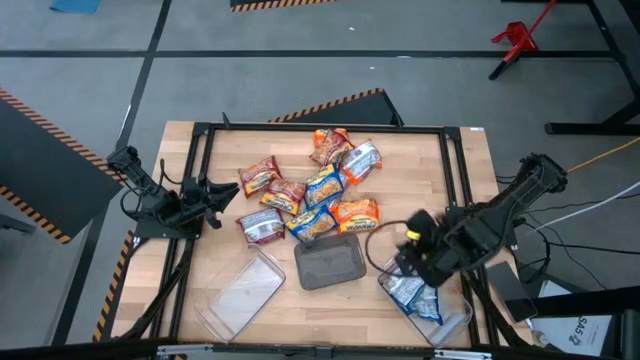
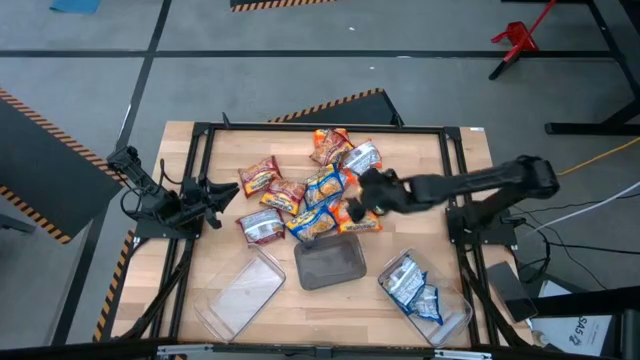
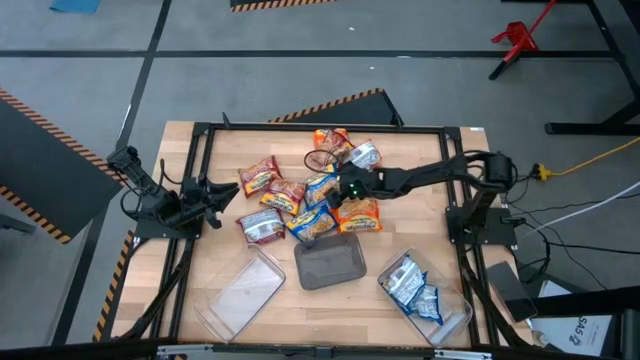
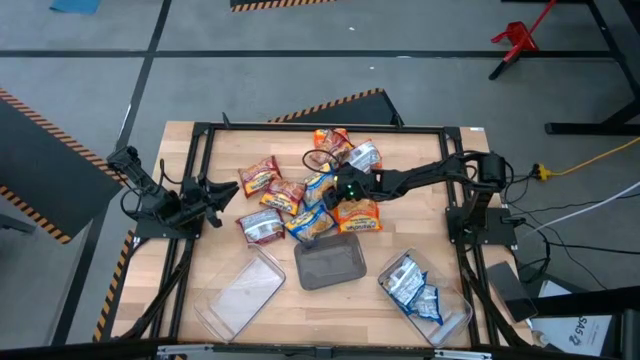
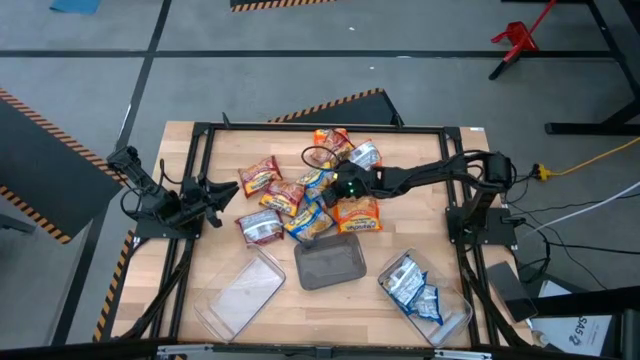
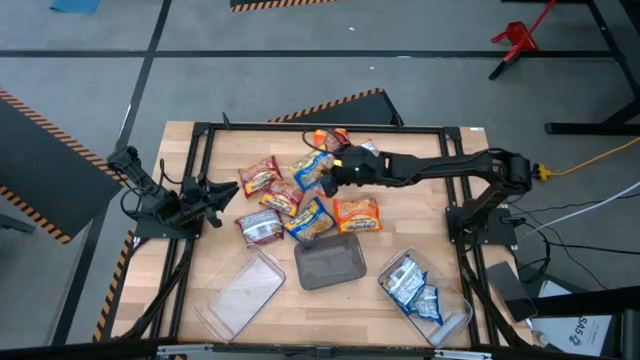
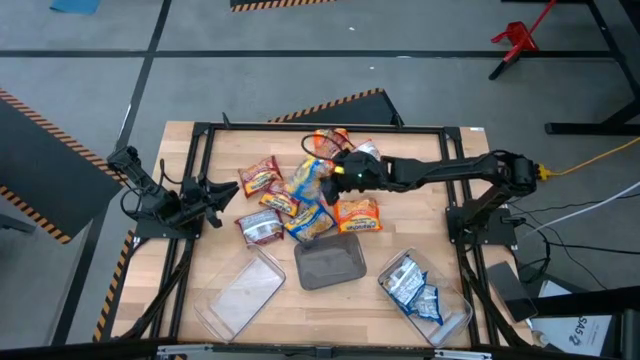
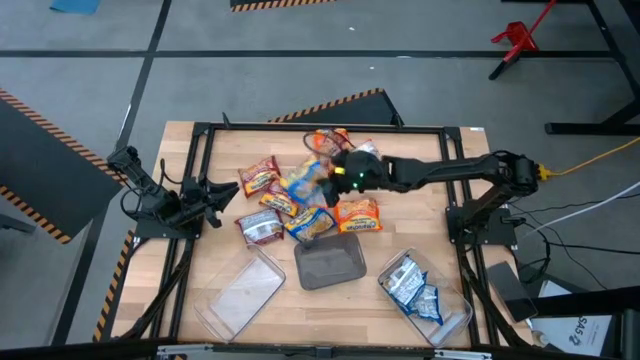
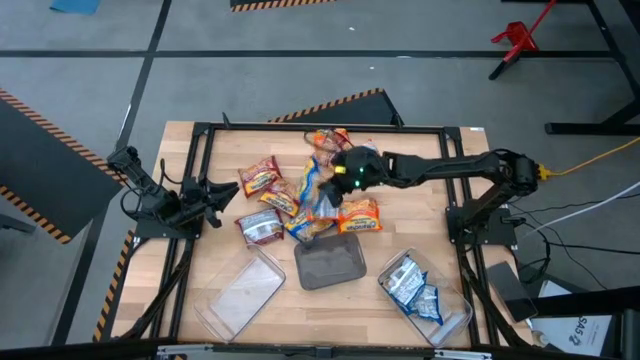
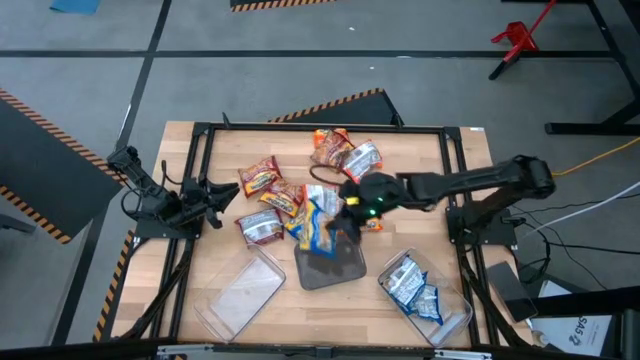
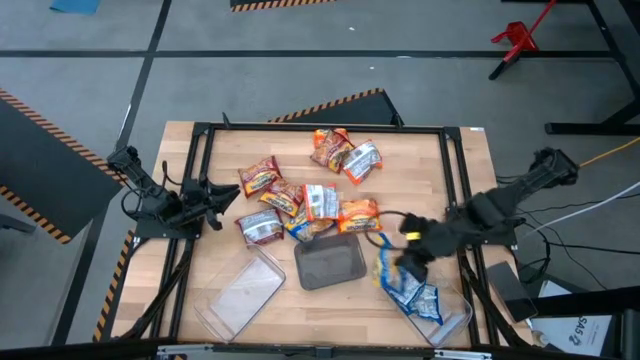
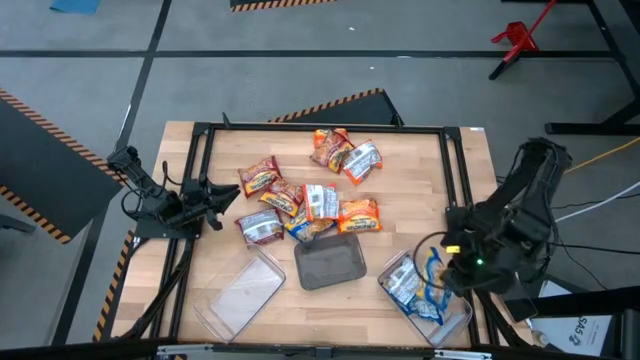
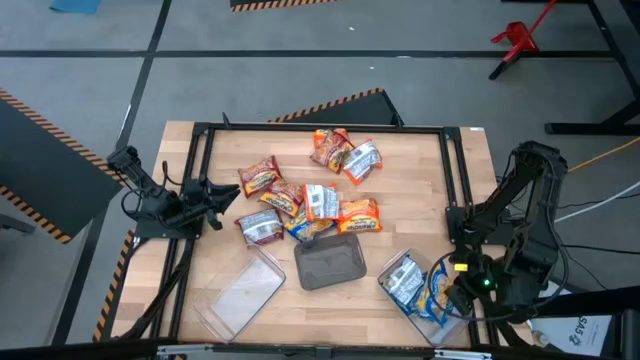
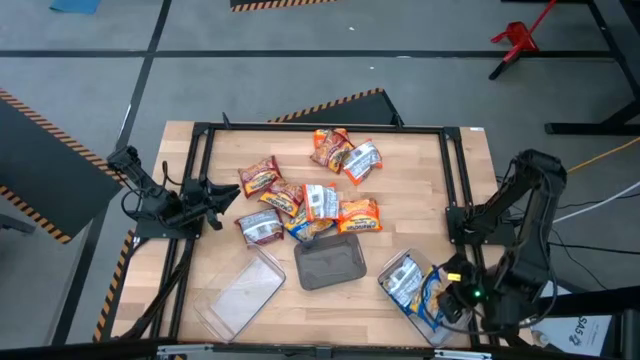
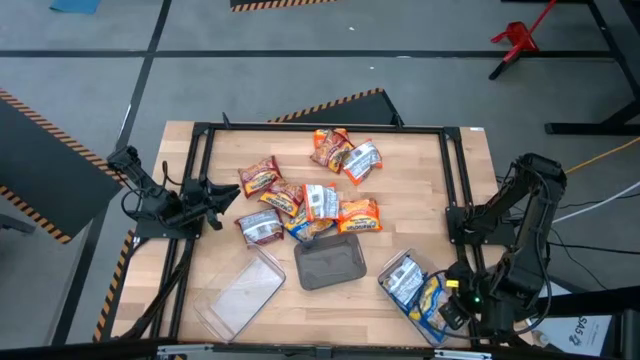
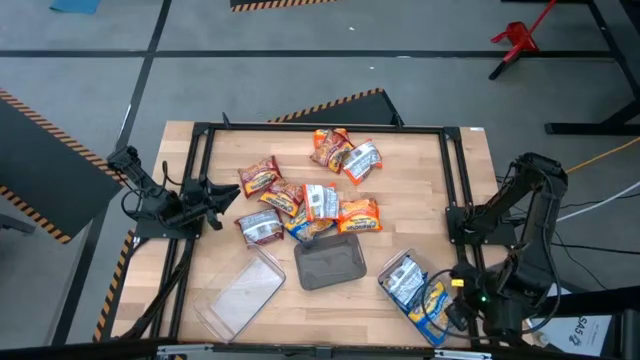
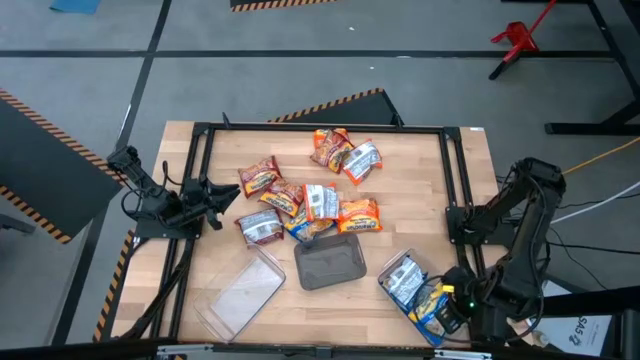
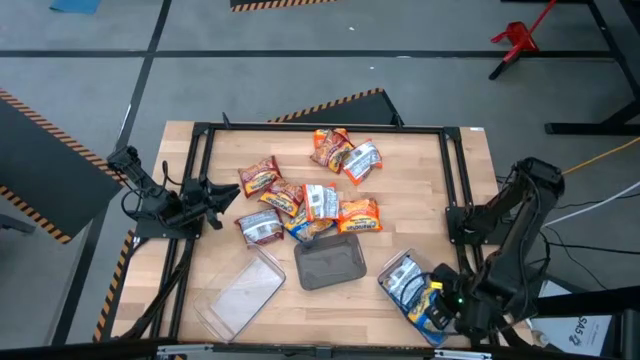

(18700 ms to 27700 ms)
Task: Sort Maruchan noodles
Put the blue noodle pack into the right transparent bin

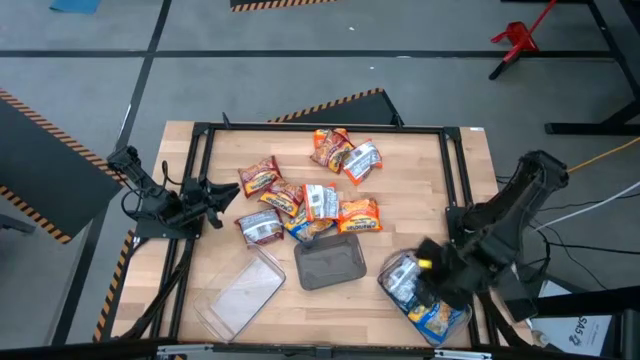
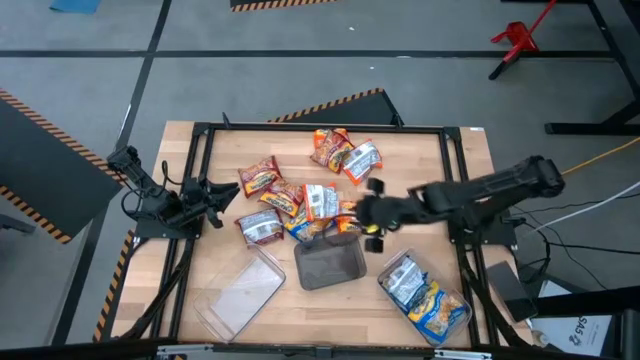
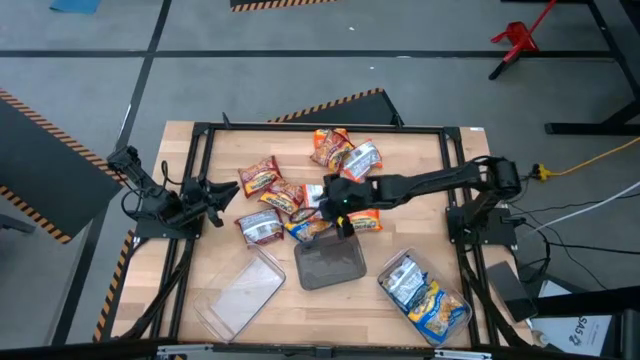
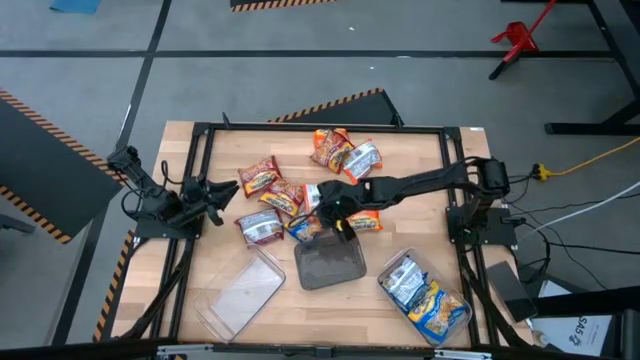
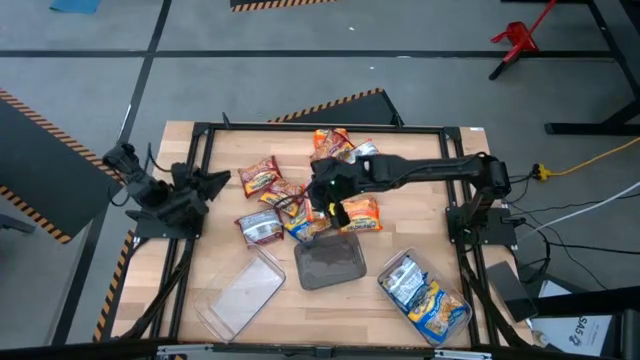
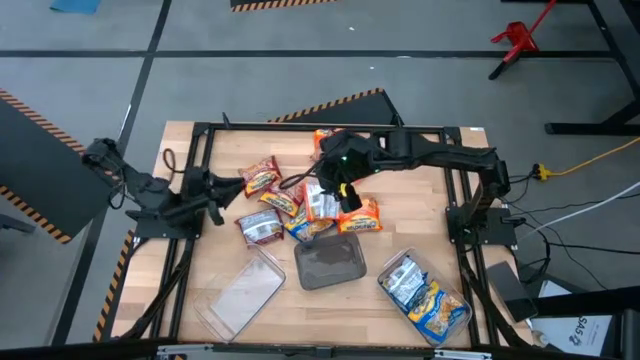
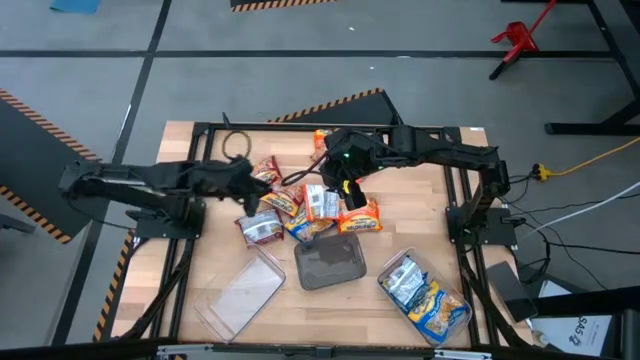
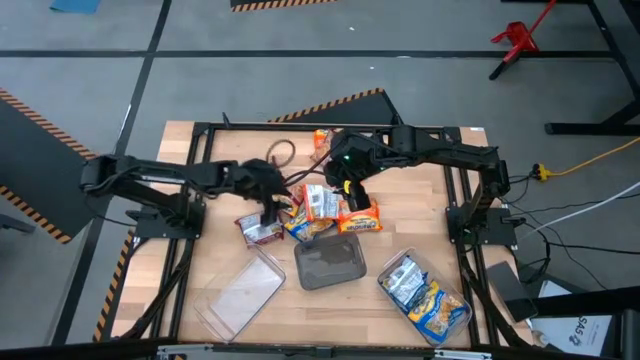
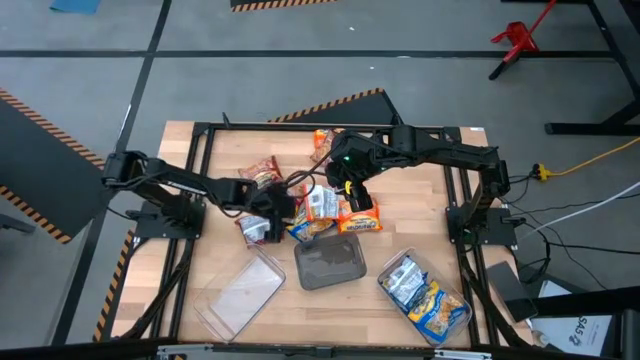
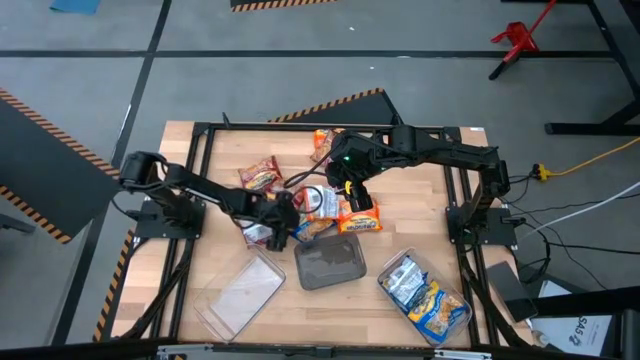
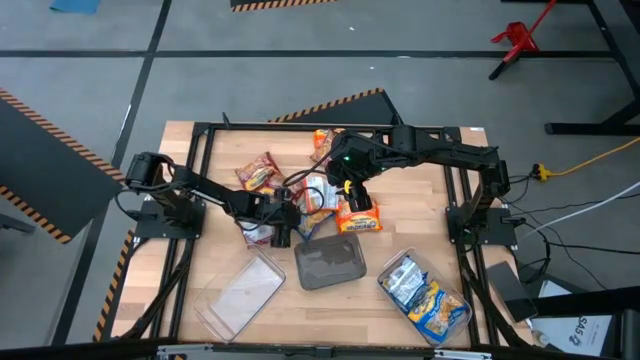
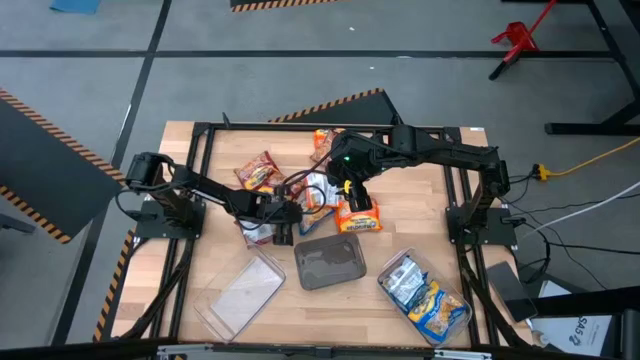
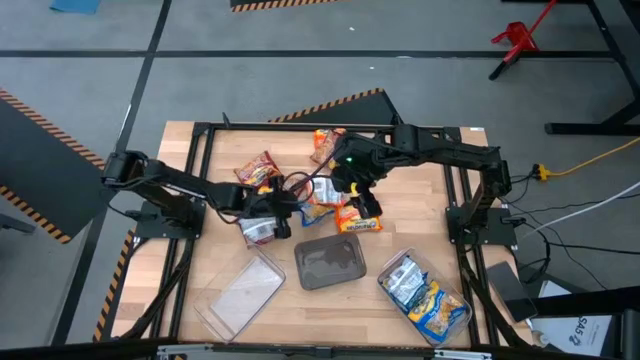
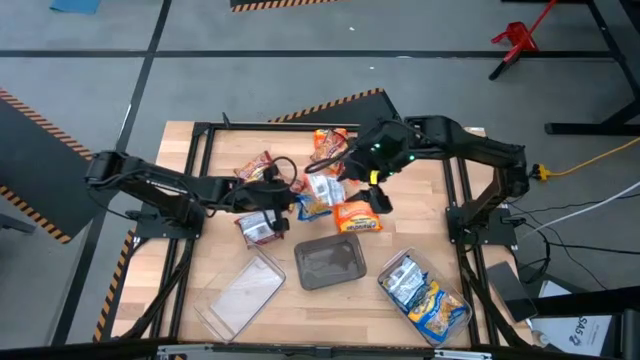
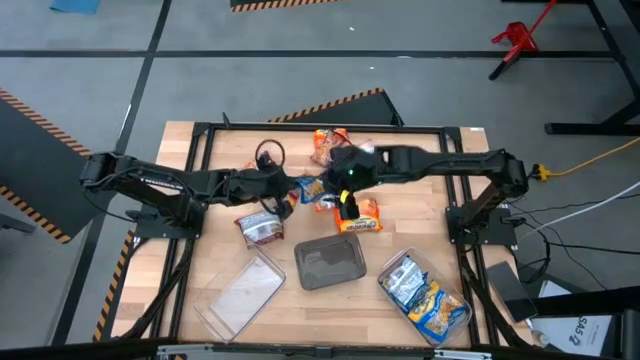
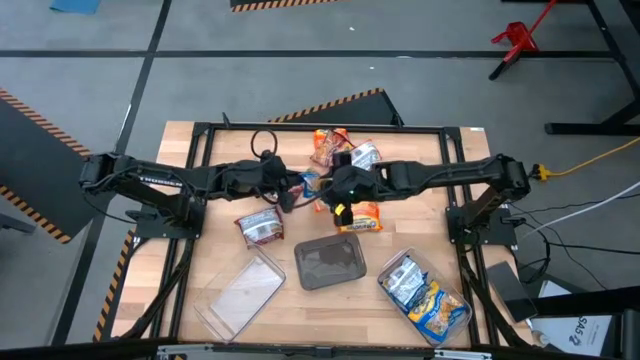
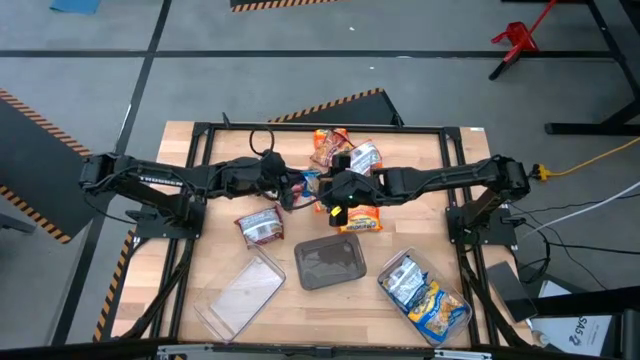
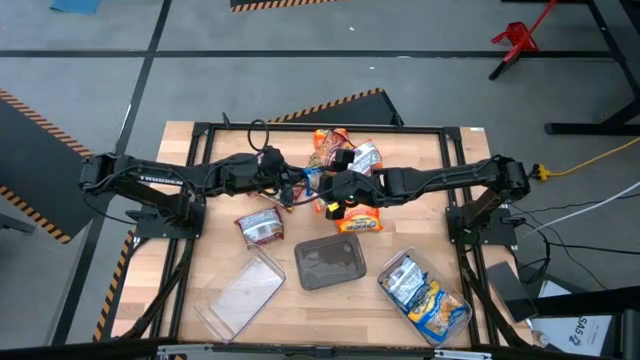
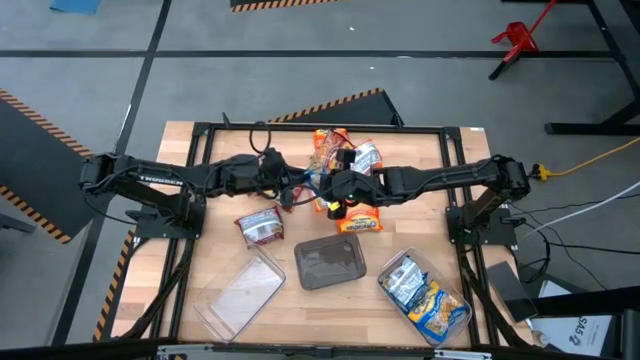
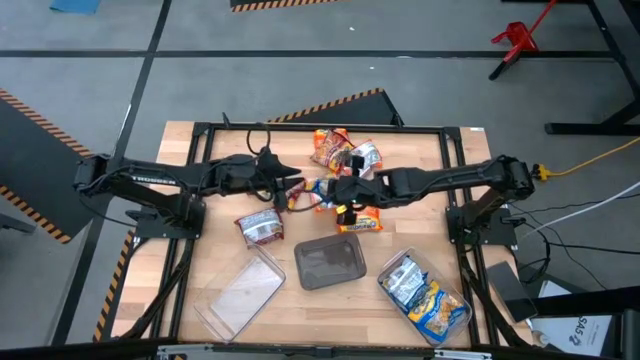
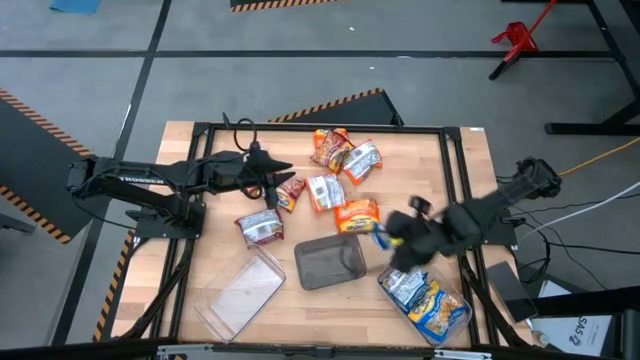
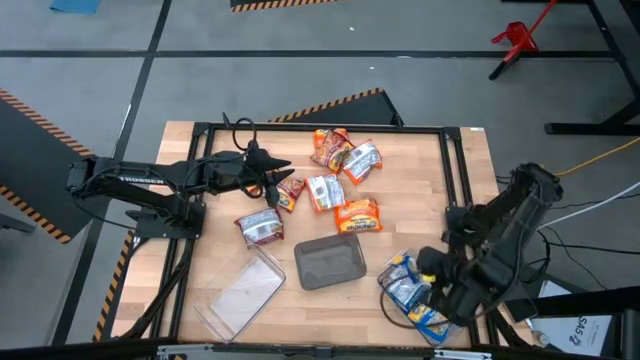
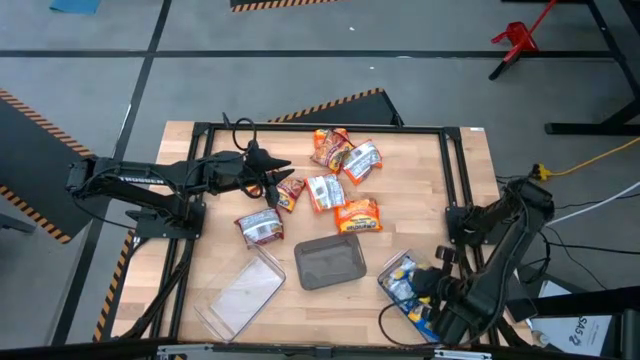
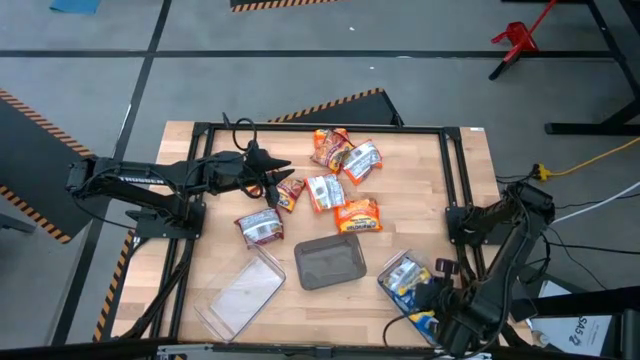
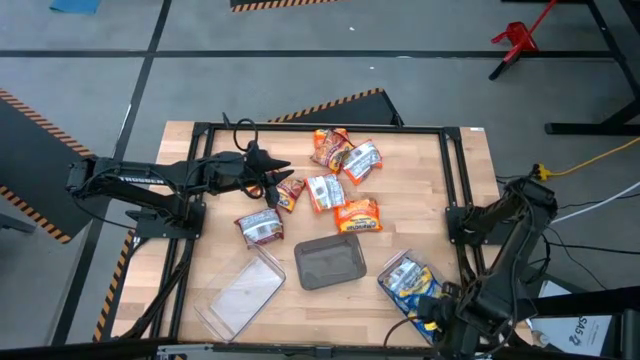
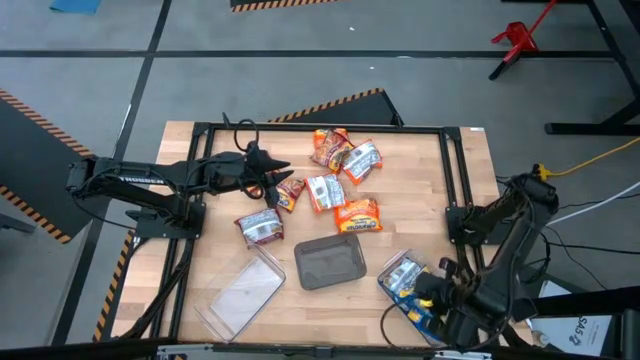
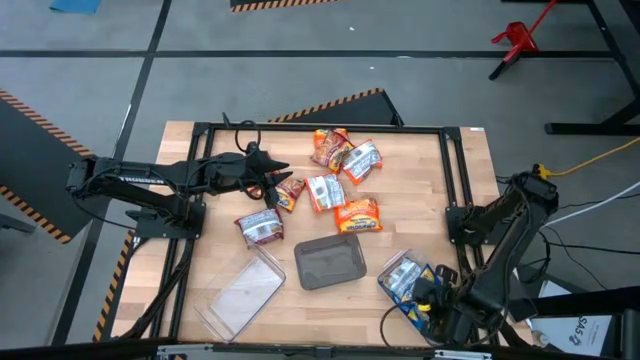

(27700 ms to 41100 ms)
Put the blue noodle pack into the right transparent bin
